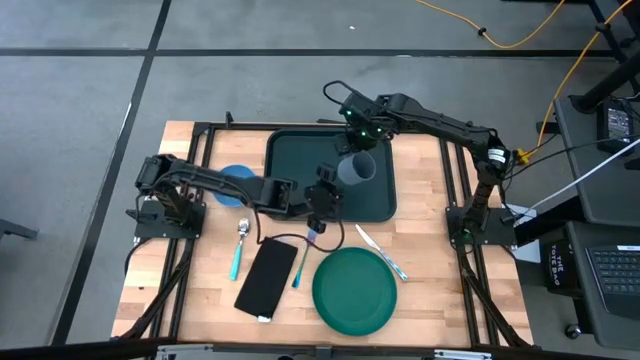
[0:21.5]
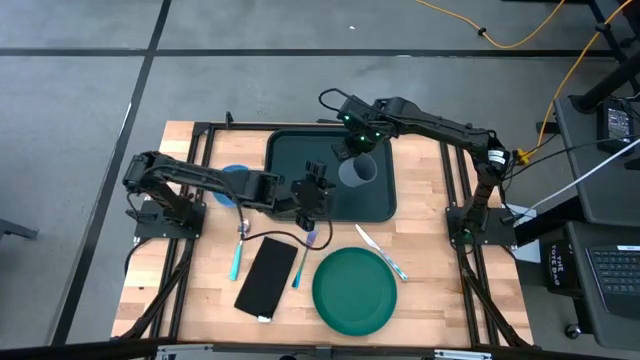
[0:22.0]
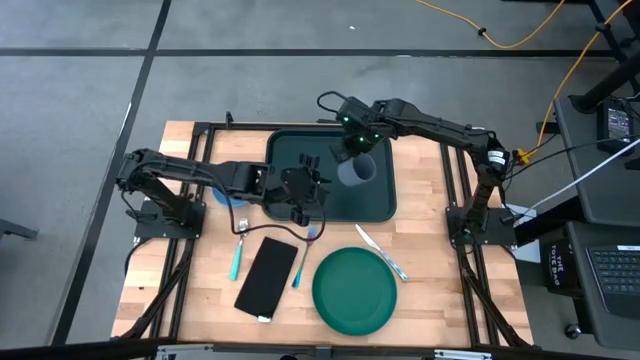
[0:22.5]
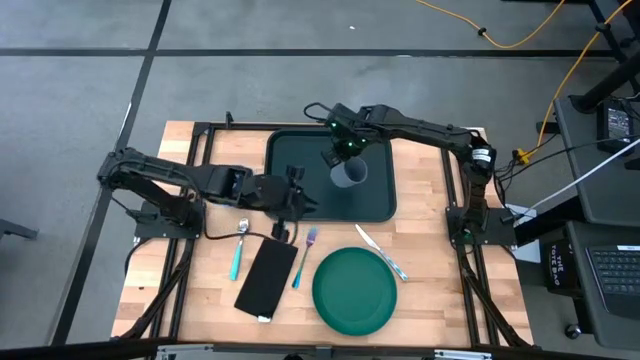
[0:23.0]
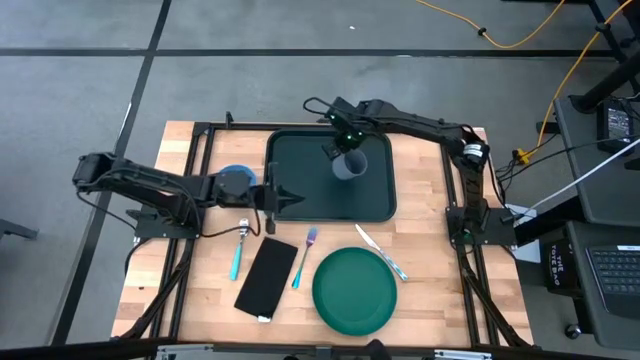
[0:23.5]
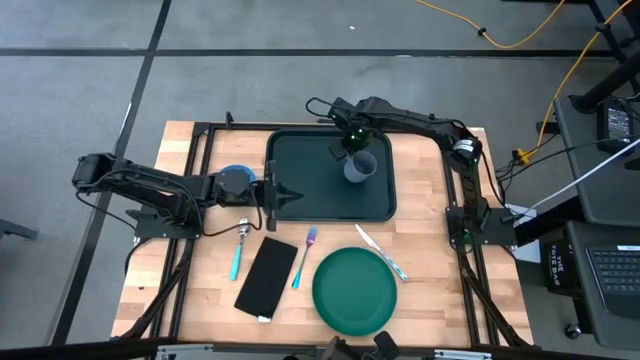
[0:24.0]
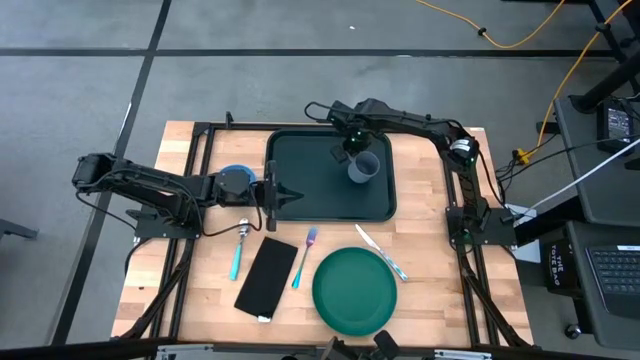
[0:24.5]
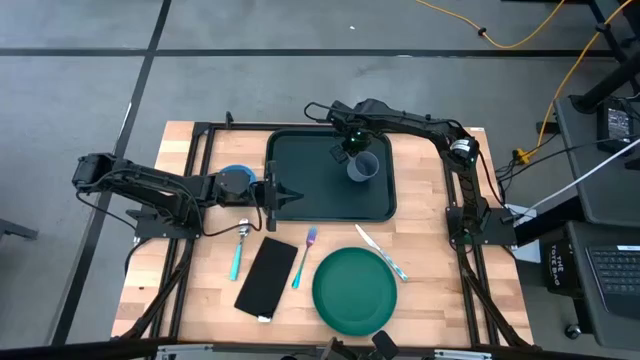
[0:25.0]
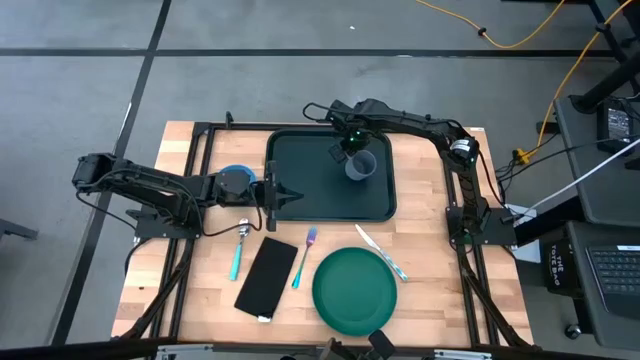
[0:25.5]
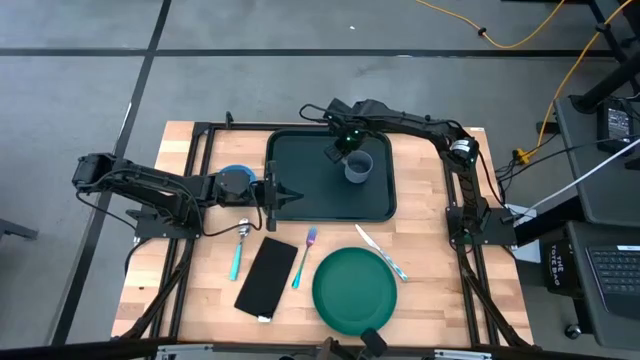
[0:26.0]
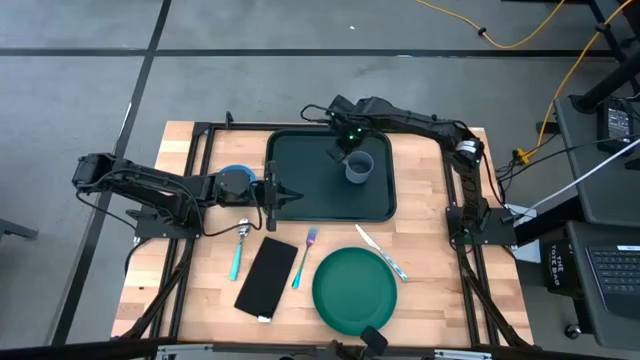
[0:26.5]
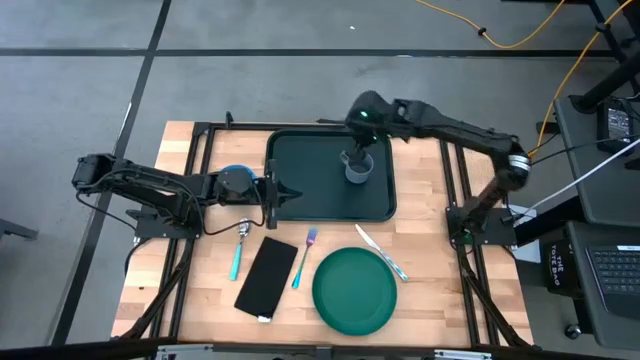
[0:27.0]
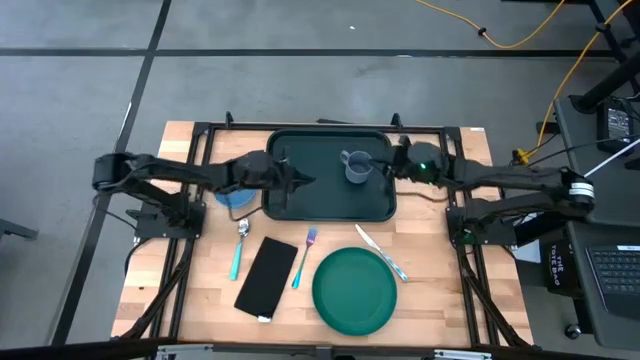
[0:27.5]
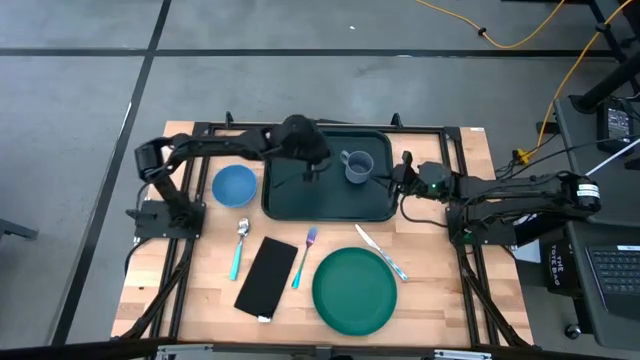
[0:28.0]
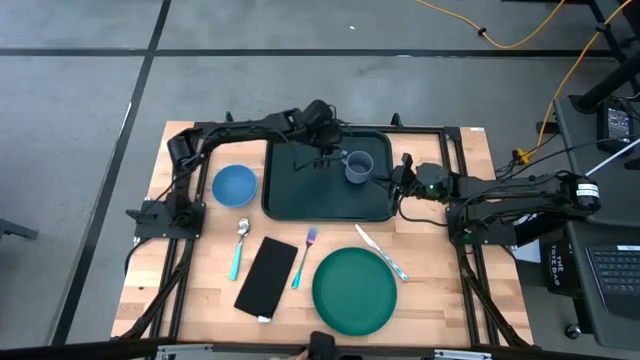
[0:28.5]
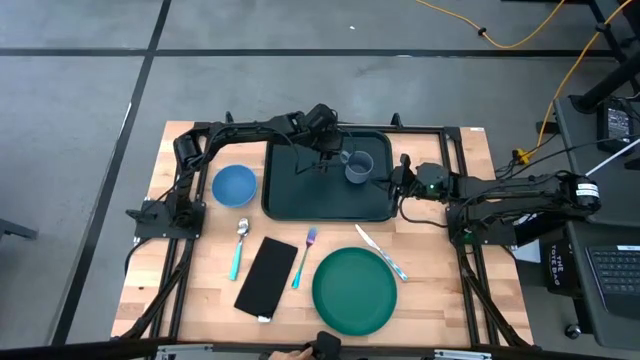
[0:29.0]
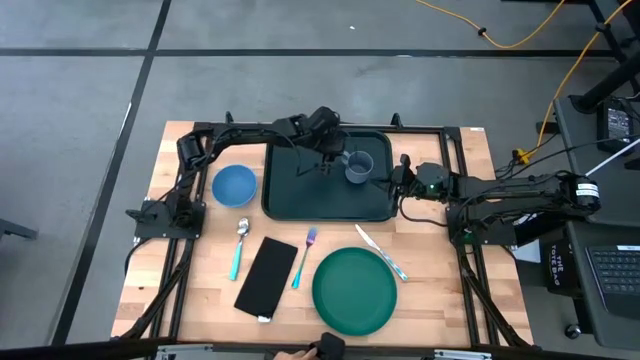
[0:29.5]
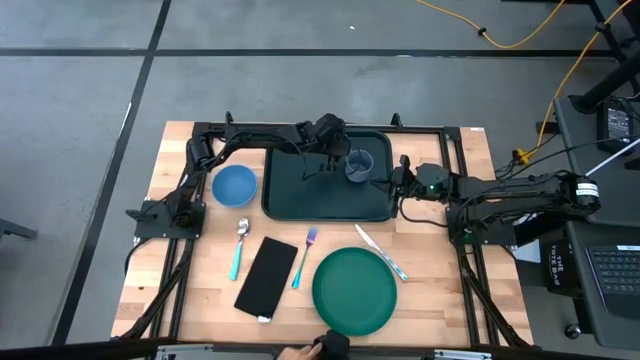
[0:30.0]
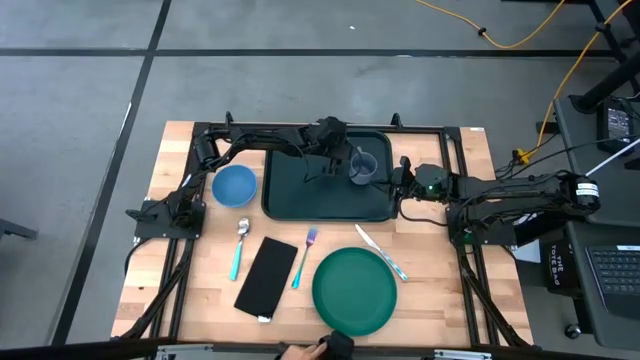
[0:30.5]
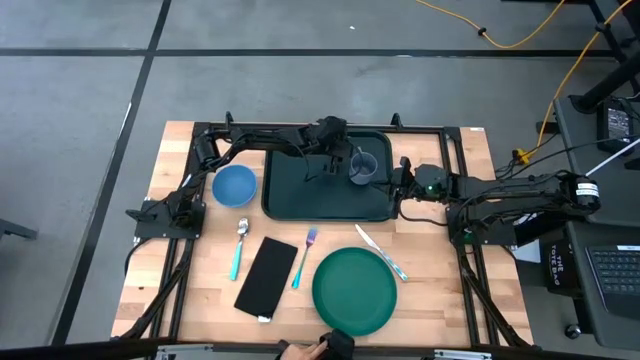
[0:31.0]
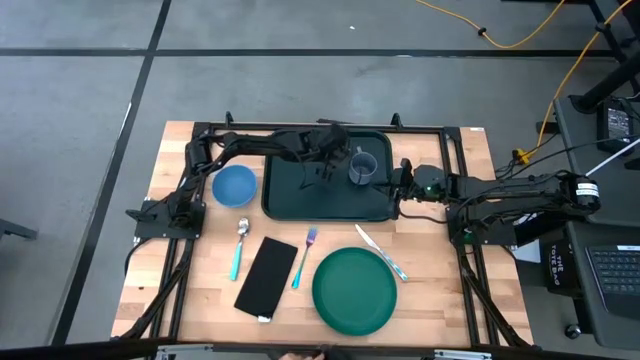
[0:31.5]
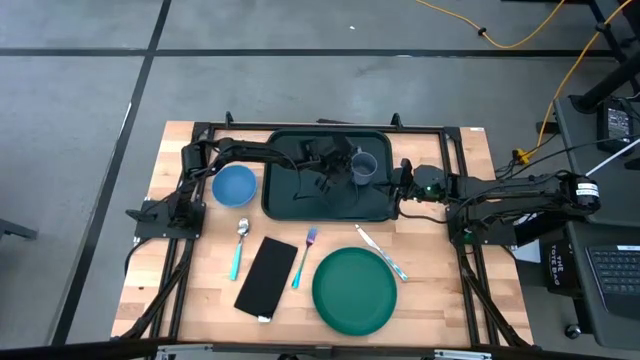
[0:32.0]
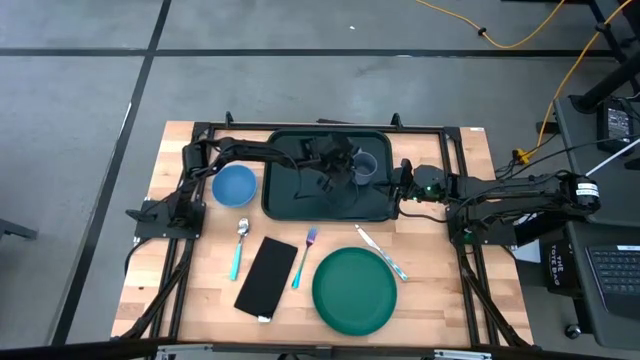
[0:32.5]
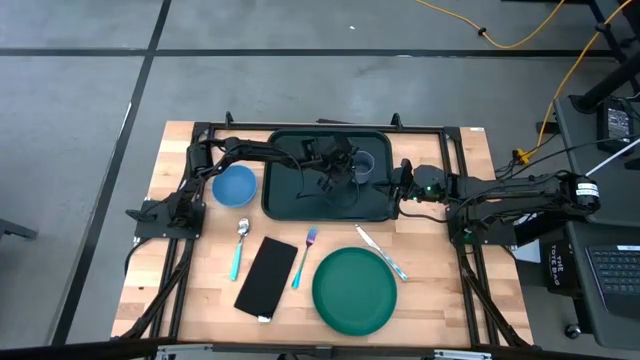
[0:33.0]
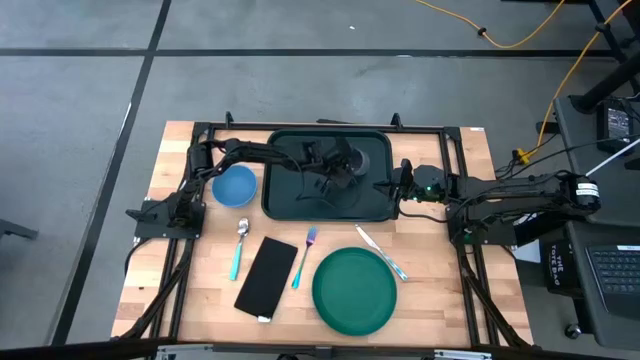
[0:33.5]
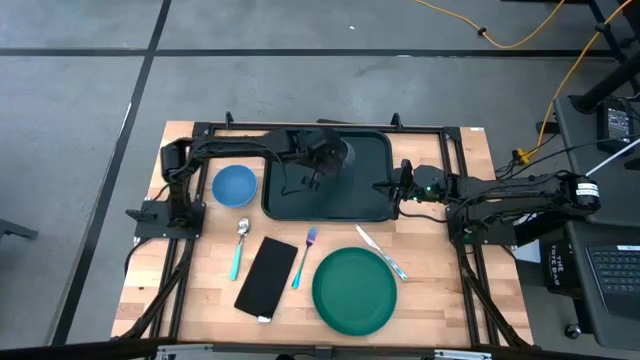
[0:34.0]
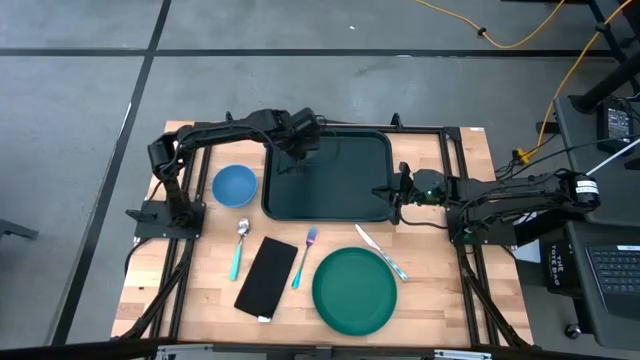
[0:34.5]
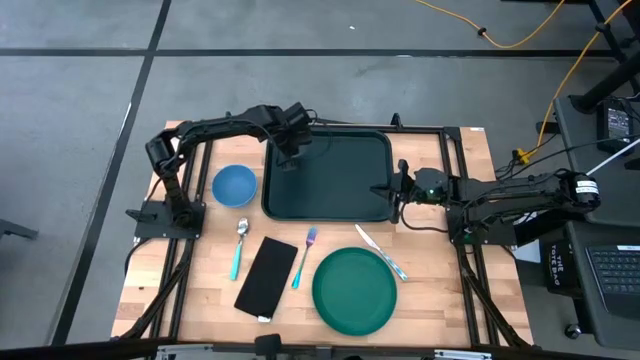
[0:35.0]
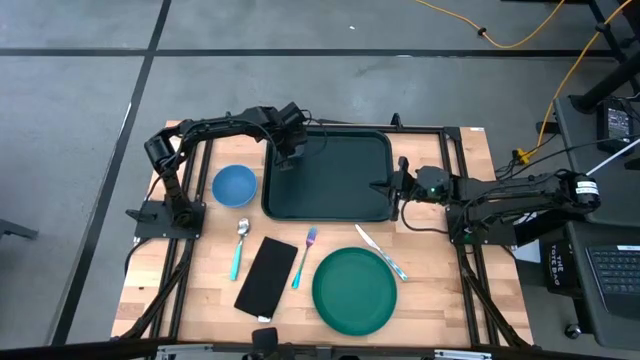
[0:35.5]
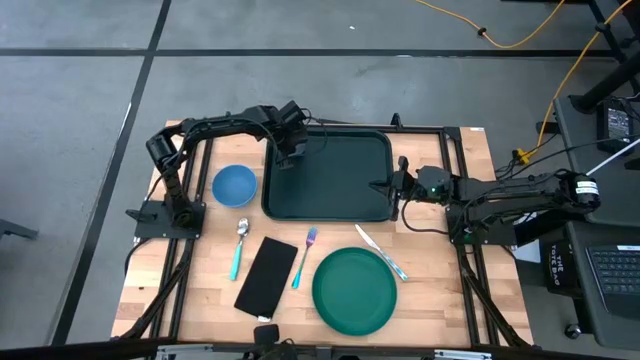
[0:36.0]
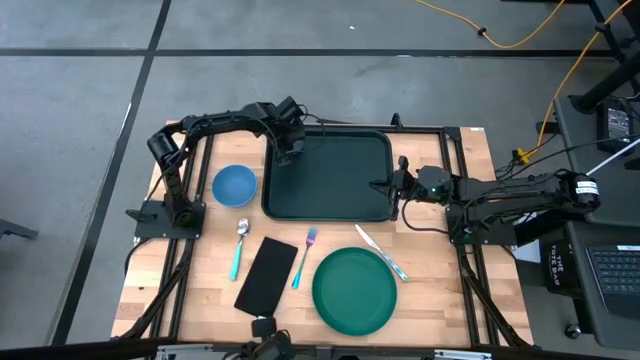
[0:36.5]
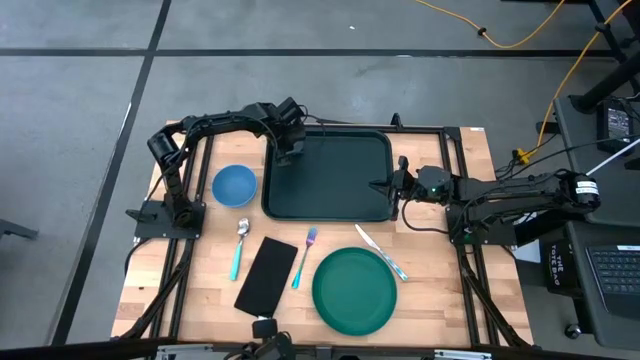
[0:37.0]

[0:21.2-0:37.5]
Task: Set up tray
Put the gray cup on the top left of the black serving tray

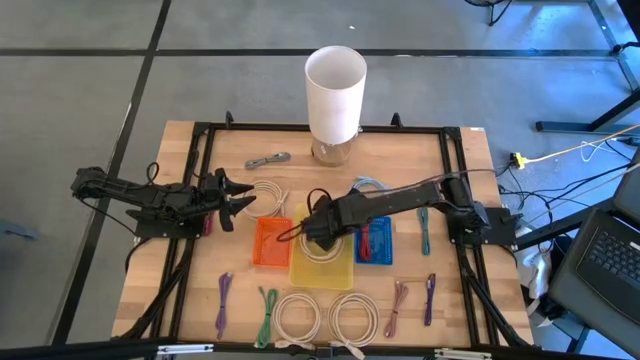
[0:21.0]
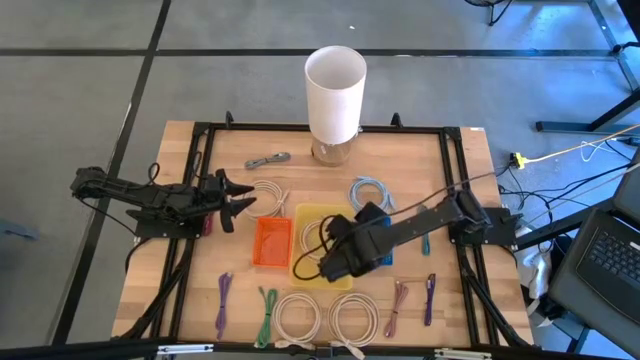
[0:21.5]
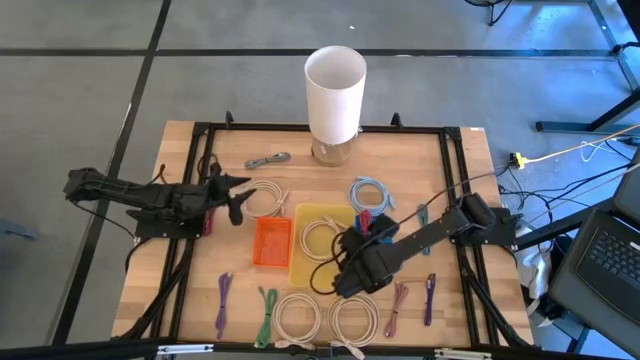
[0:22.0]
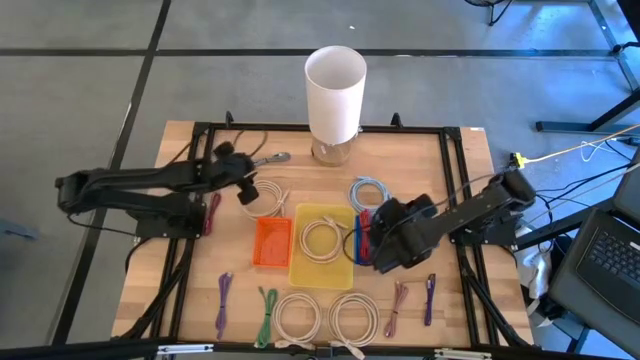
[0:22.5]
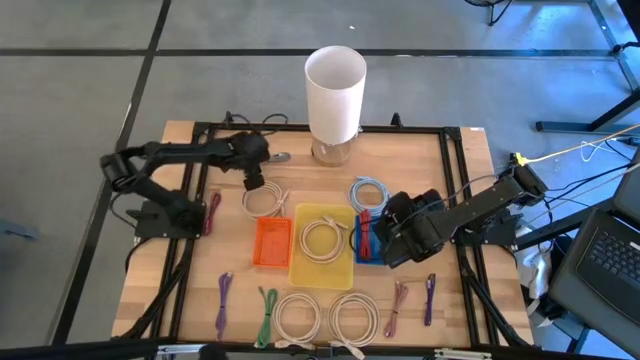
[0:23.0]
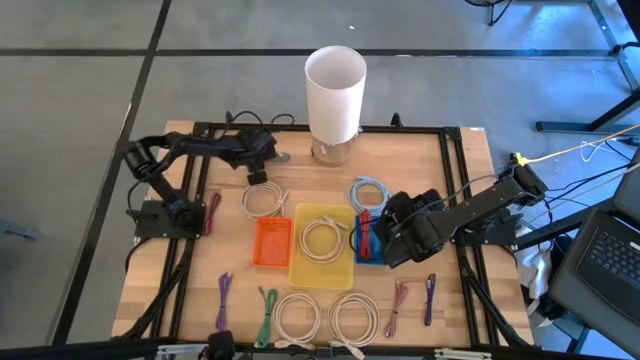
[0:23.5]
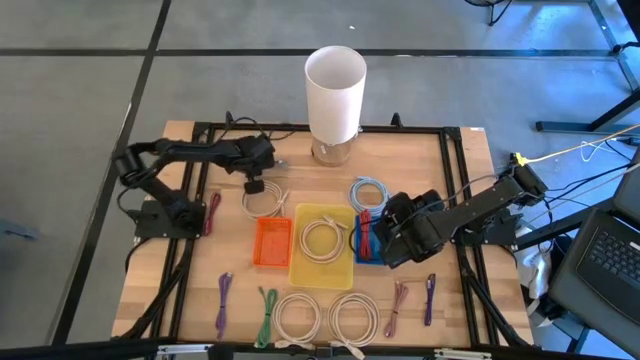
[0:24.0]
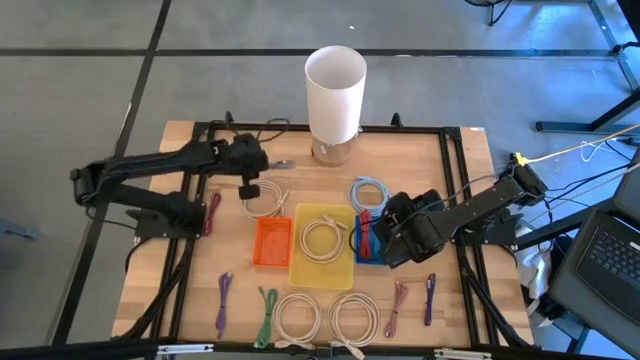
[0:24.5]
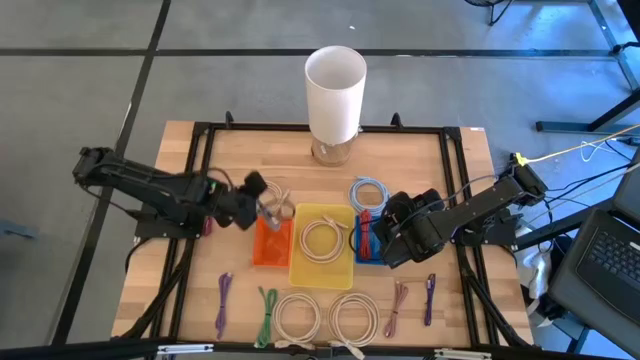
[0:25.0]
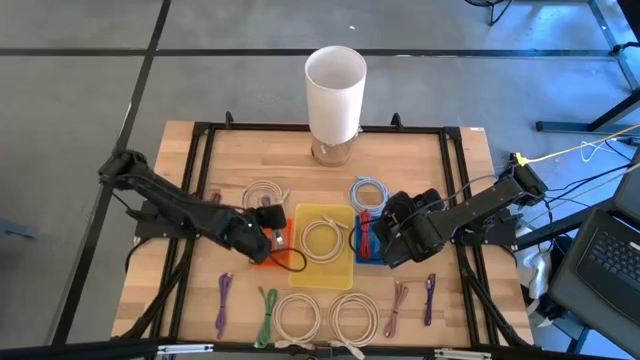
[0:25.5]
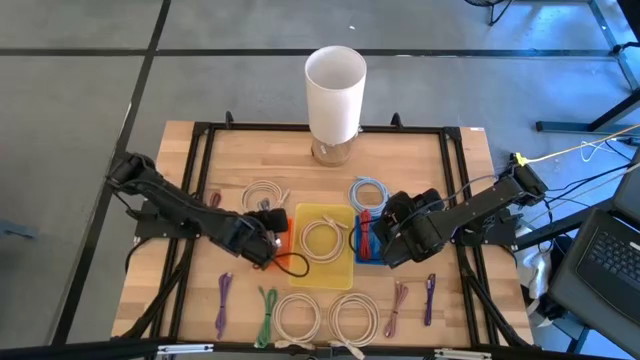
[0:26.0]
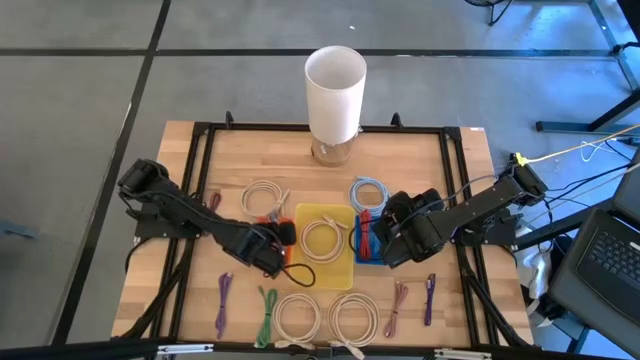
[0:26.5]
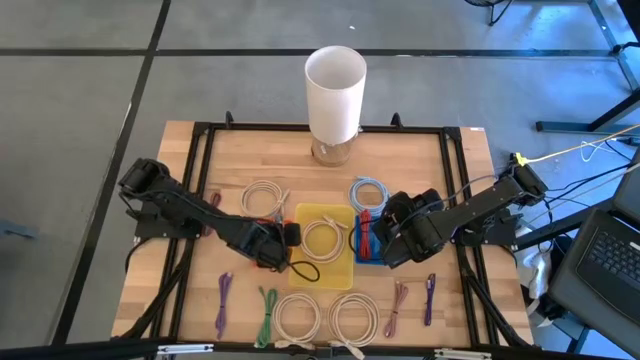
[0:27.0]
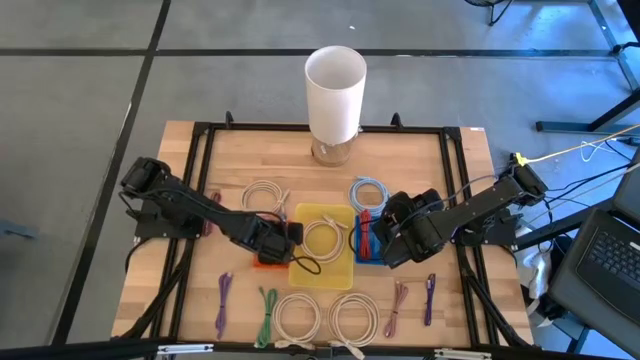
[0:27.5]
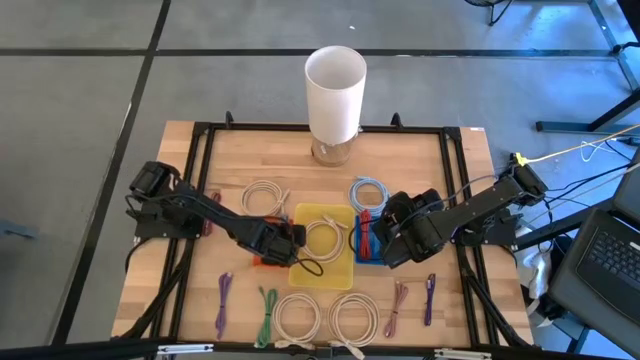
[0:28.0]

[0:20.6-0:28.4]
Task: Pick & Place USB Port
Put the black and white charger cable into the orange bin
